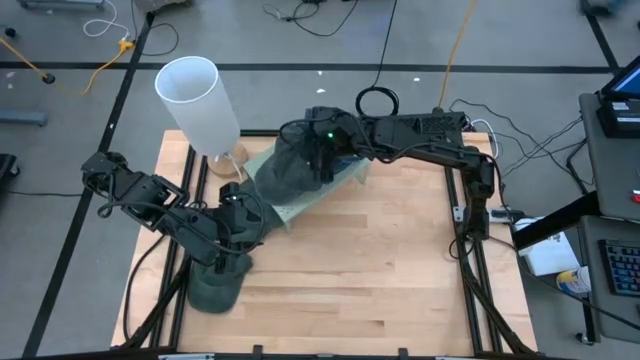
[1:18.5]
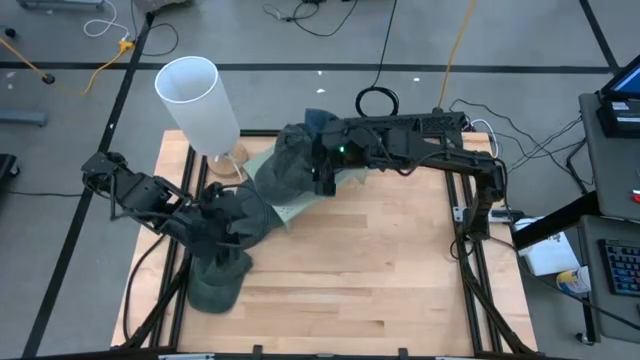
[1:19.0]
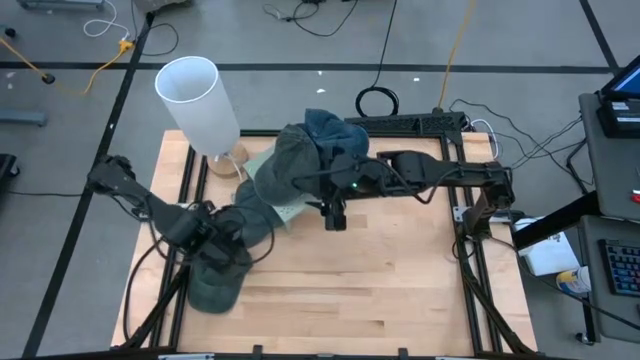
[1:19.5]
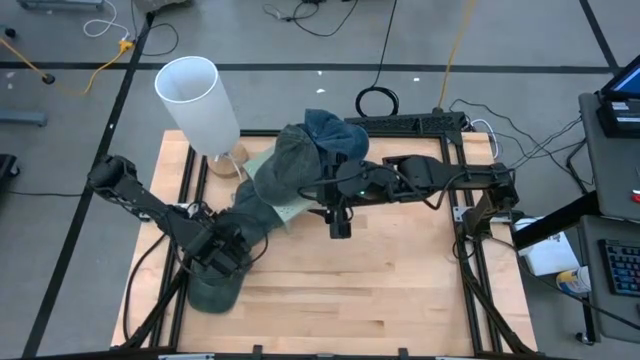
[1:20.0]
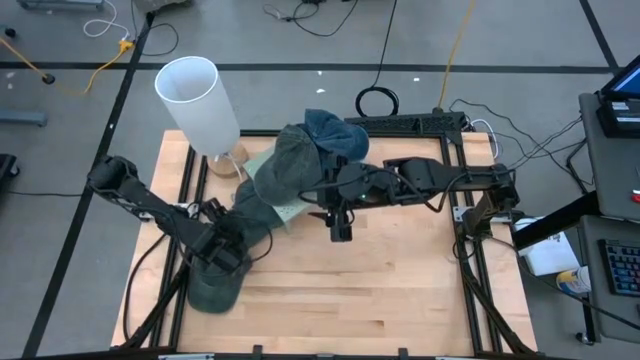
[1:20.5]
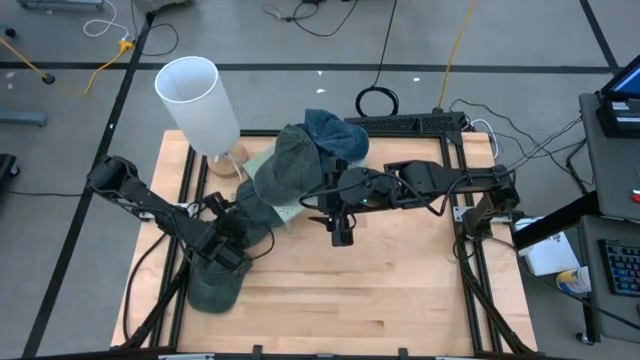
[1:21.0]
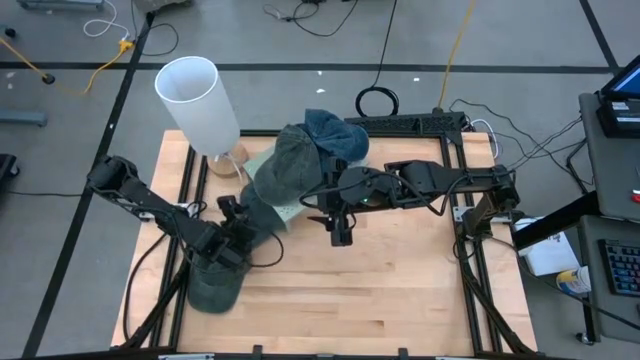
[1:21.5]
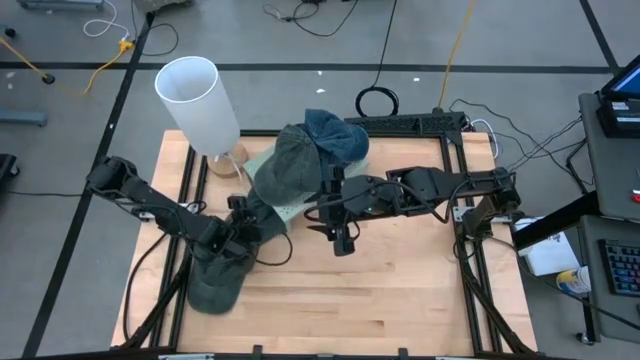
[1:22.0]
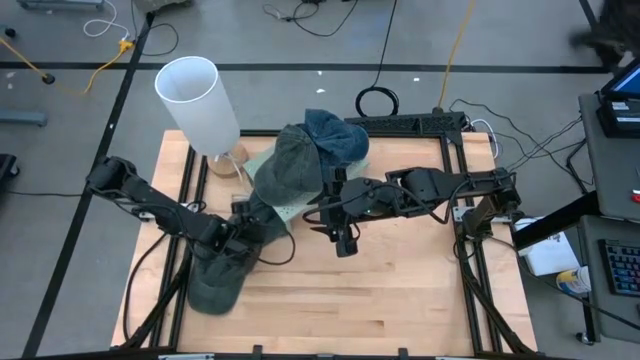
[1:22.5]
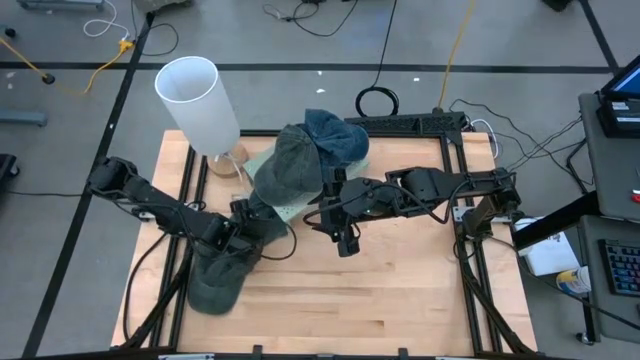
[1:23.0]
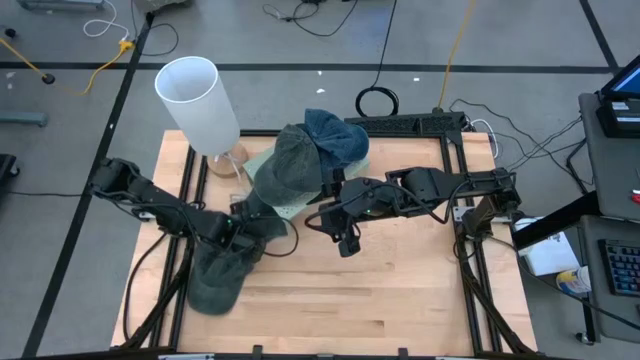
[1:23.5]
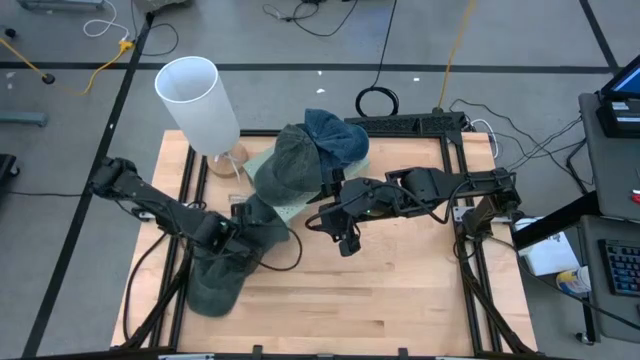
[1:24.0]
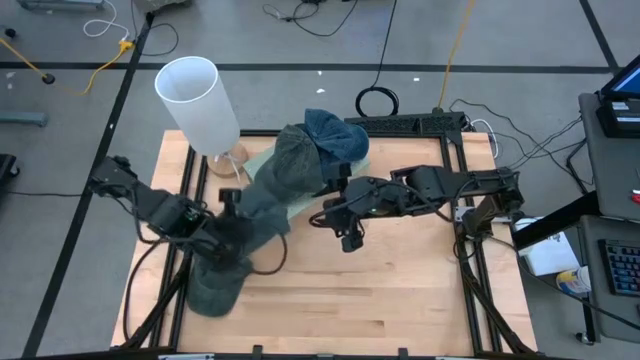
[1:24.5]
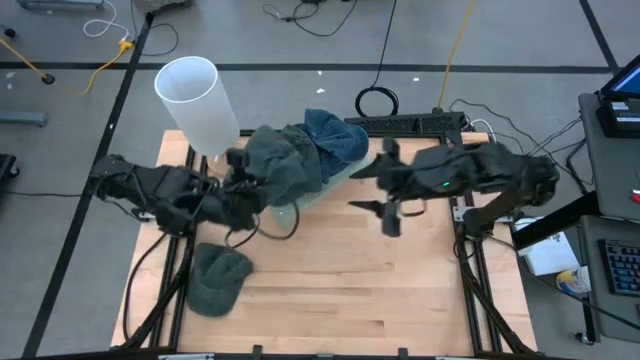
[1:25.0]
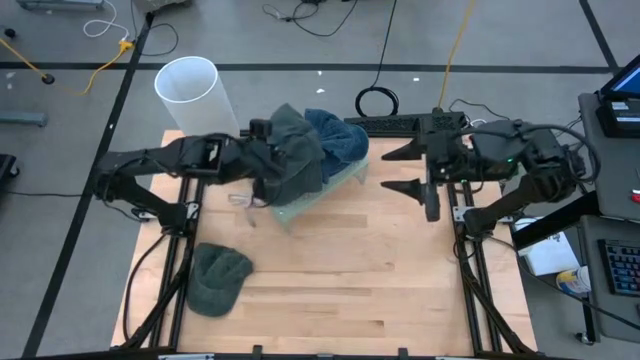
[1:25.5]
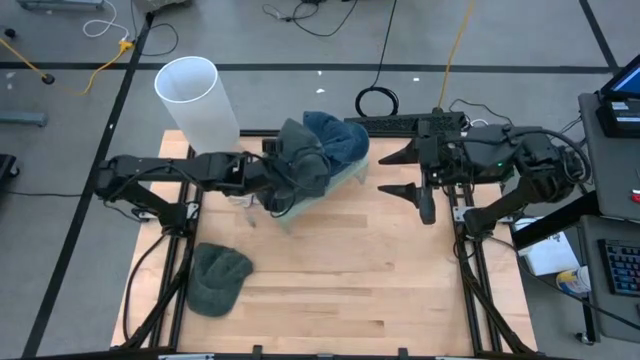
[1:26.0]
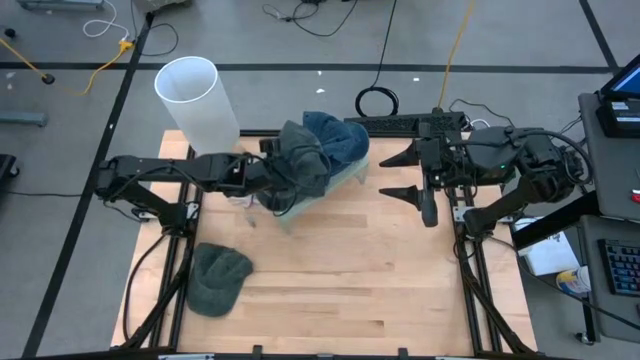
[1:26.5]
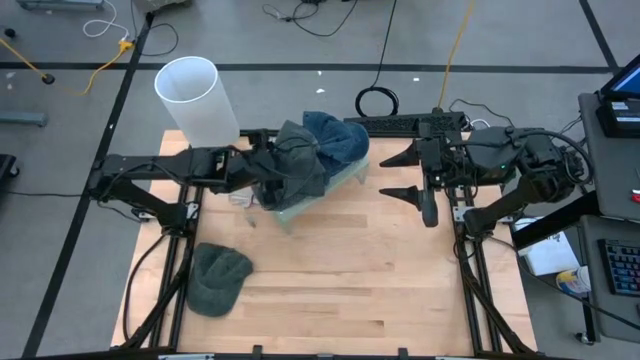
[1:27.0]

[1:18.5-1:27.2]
Task: Pick & Place hat
Stack the top green cap on the other green cap on the shelf

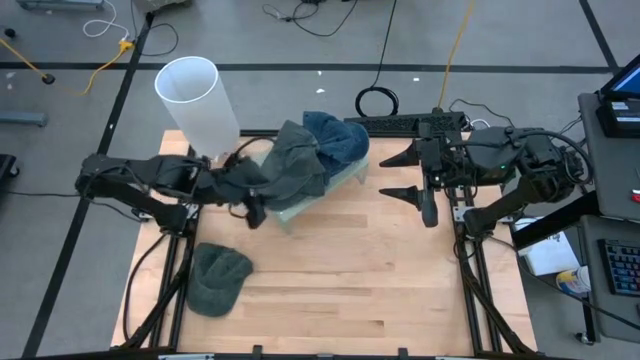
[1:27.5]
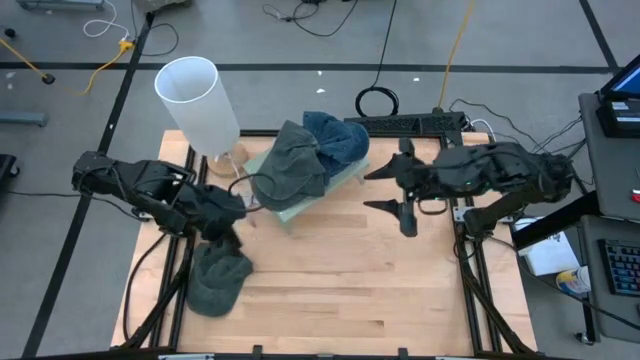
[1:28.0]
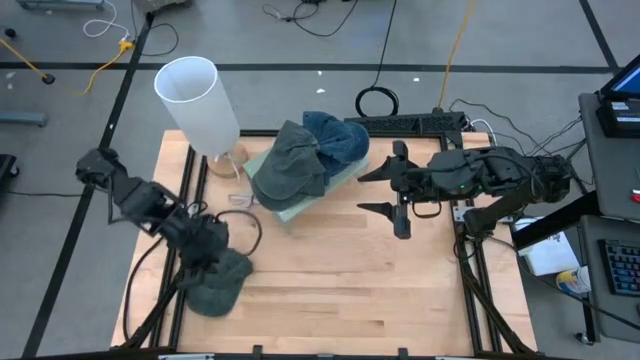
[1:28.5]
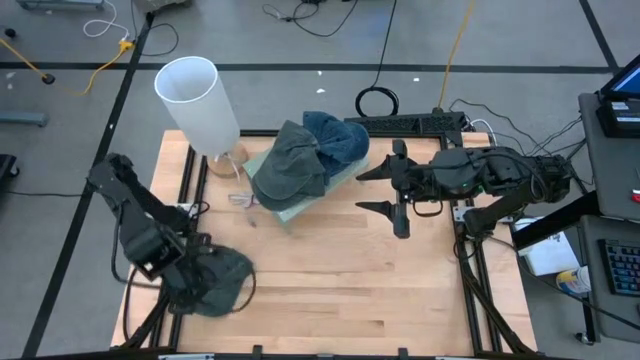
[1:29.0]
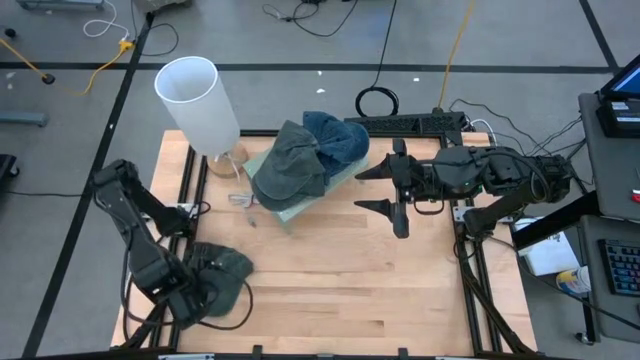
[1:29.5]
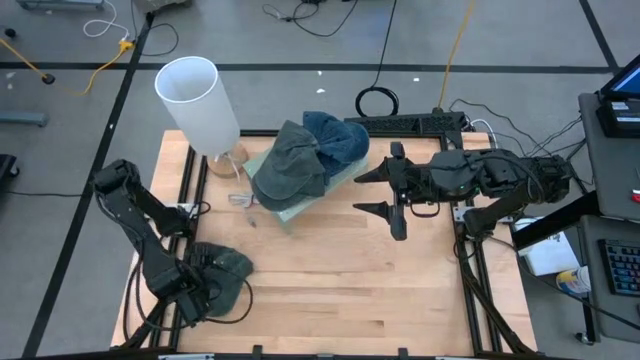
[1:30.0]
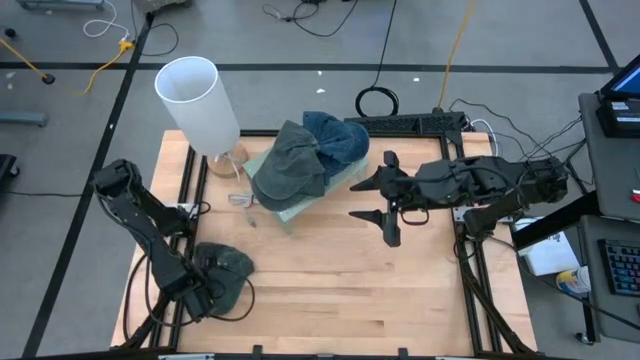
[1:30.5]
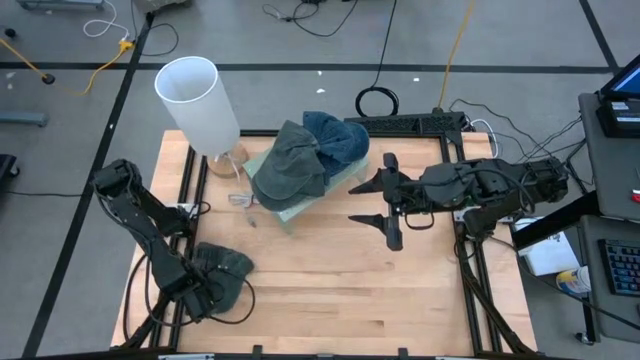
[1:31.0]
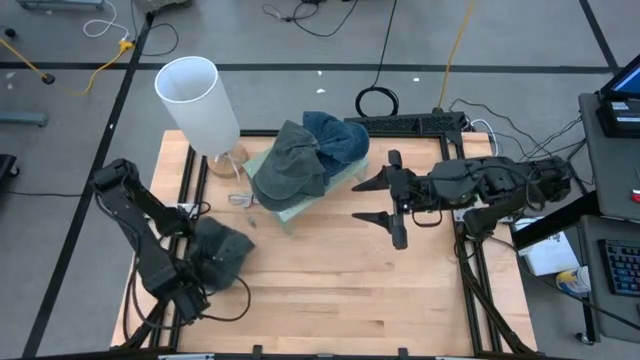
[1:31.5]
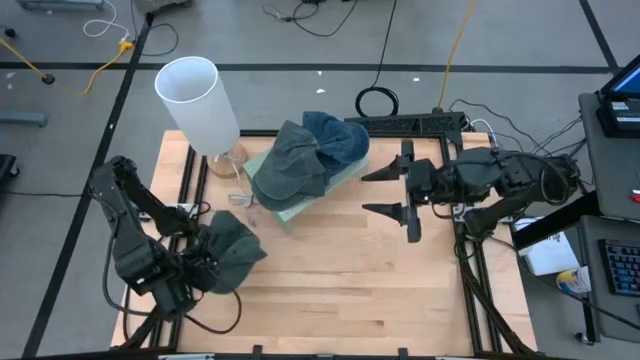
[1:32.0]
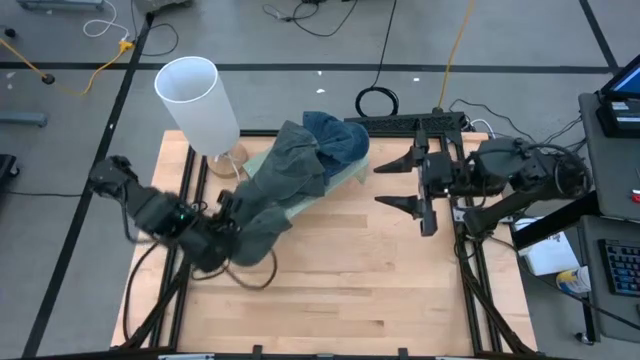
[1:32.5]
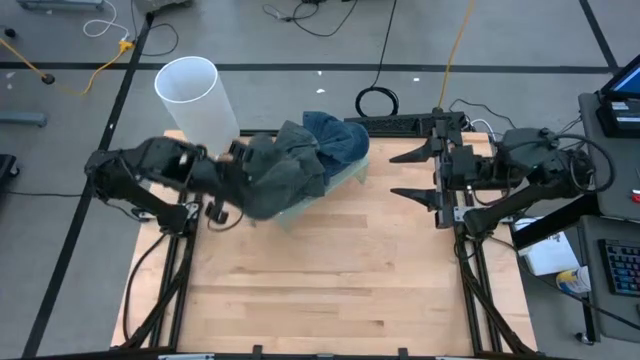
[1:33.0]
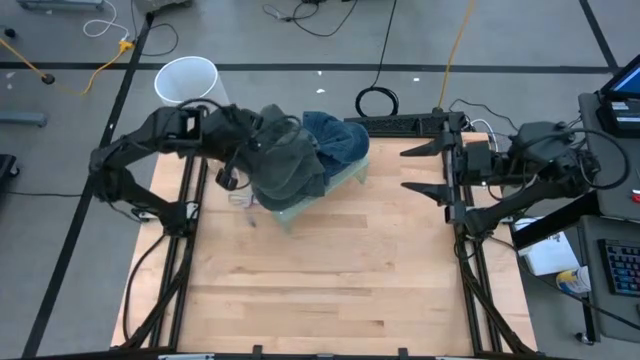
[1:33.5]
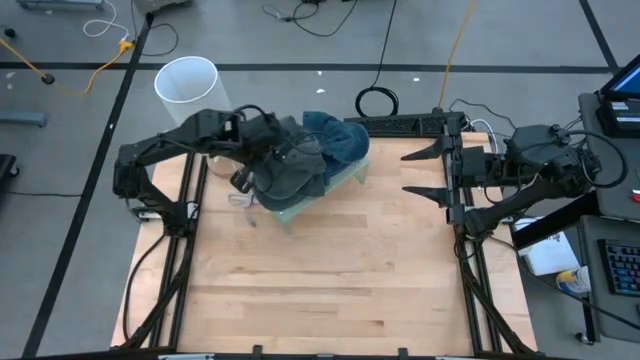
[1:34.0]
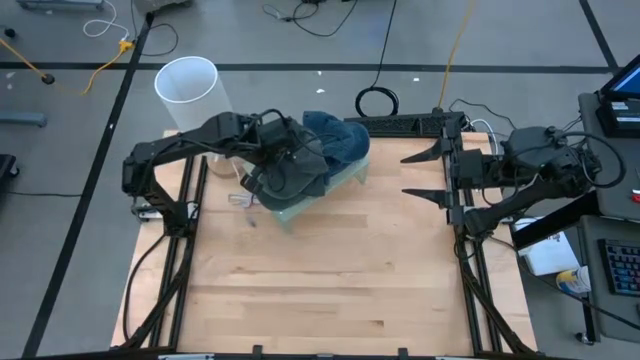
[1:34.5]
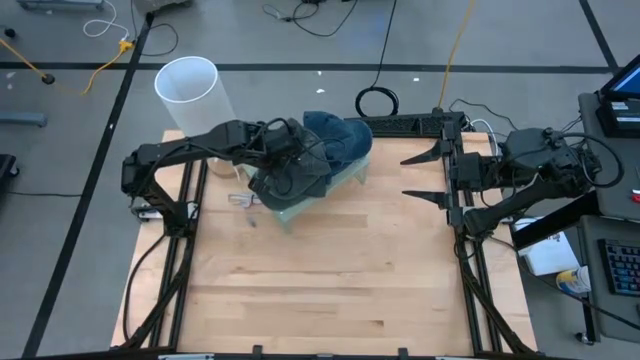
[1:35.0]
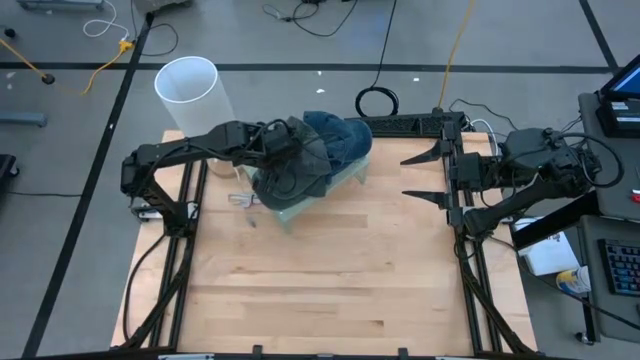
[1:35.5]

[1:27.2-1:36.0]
Stack the green cap on the other green cap on the shelf

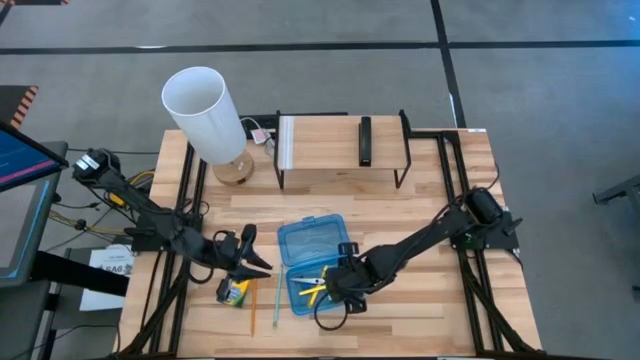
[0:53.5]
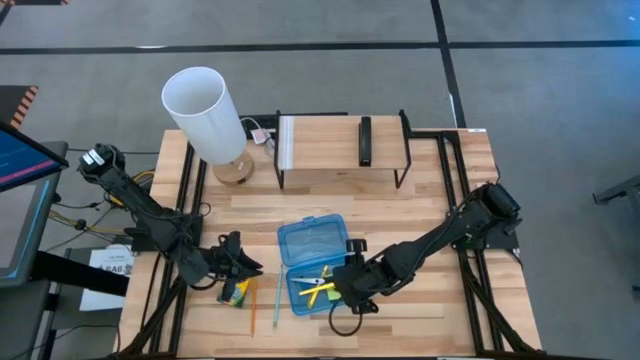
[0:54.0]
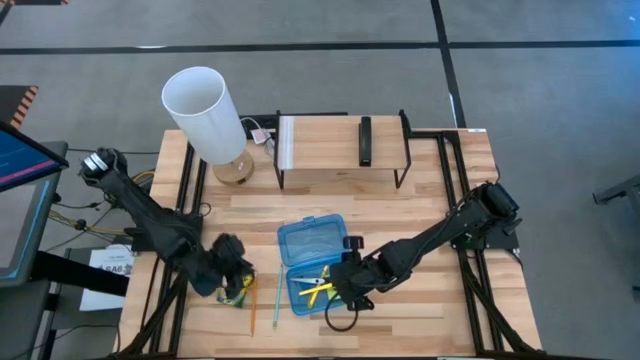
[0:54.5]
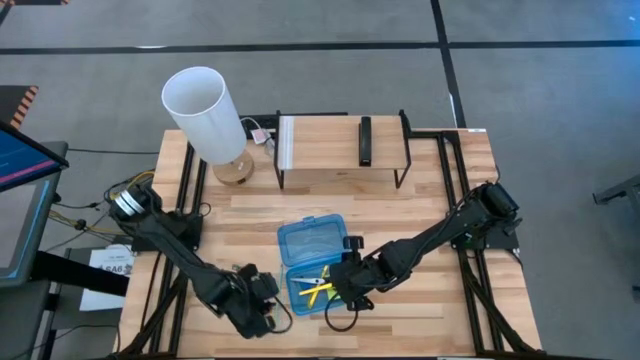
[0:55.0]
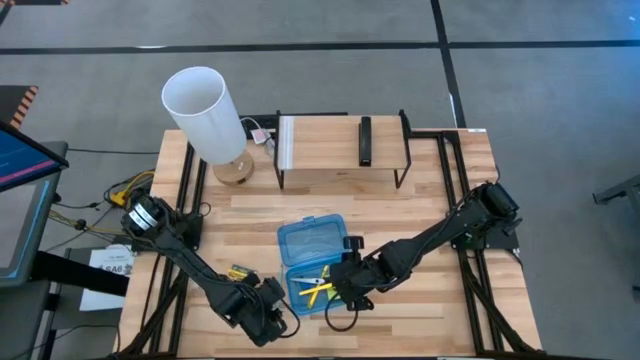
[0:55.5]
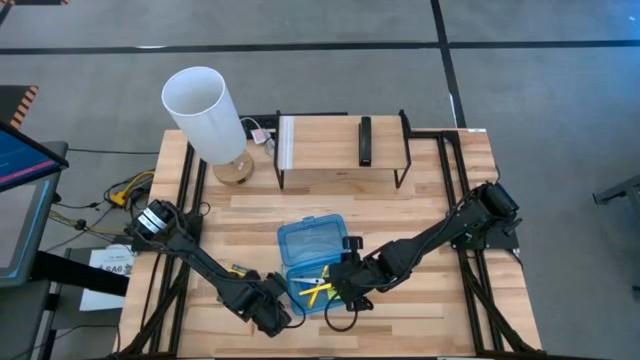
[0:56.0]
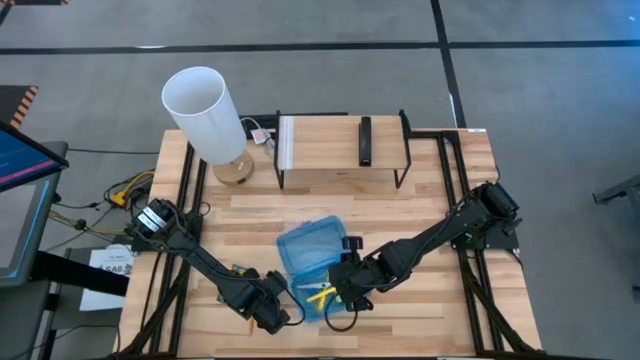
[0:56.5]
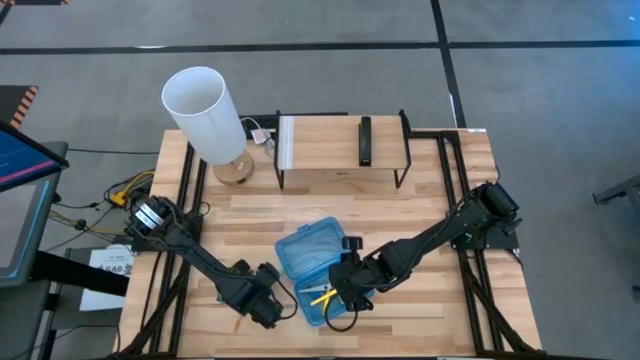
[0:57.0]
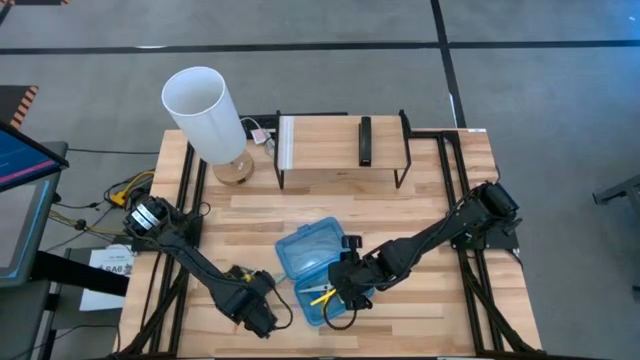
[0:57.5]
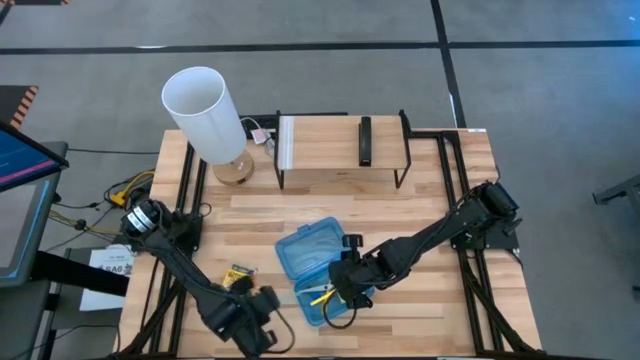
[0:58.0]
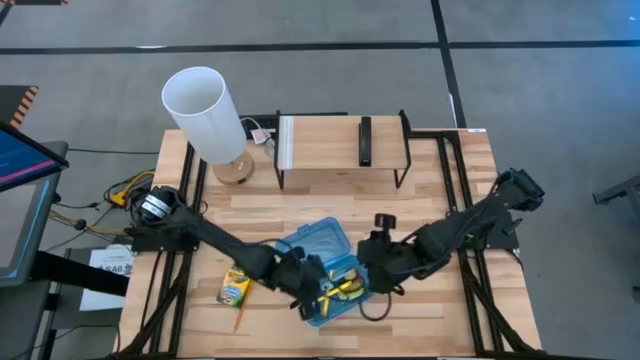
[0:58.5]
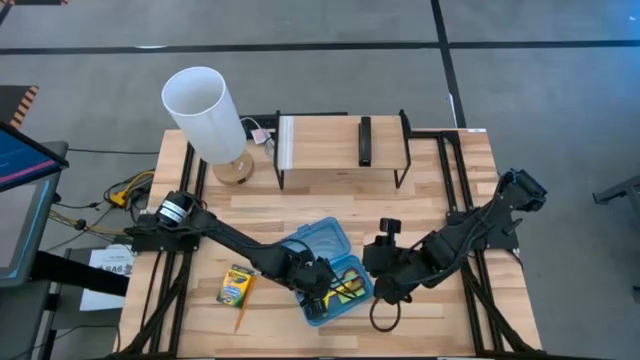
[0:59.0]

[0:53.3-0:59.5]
Task: Pack school essentials
Put the light blue pencil into the blue supply box
